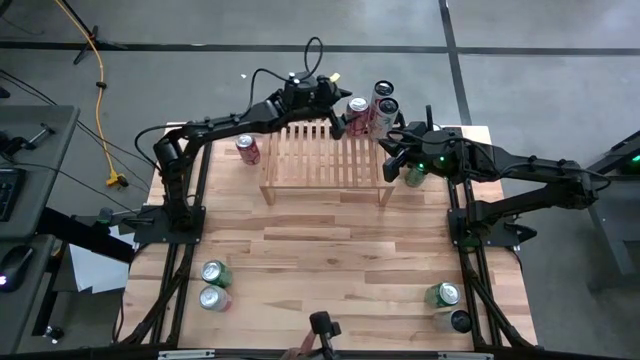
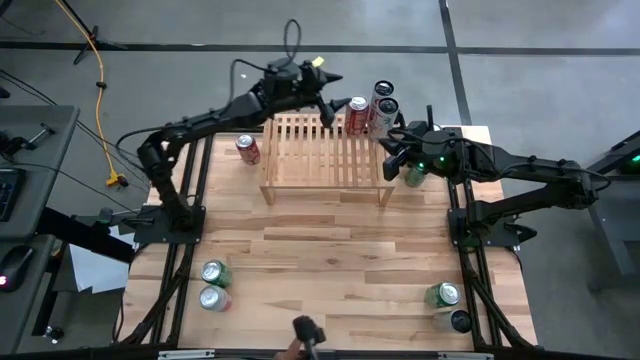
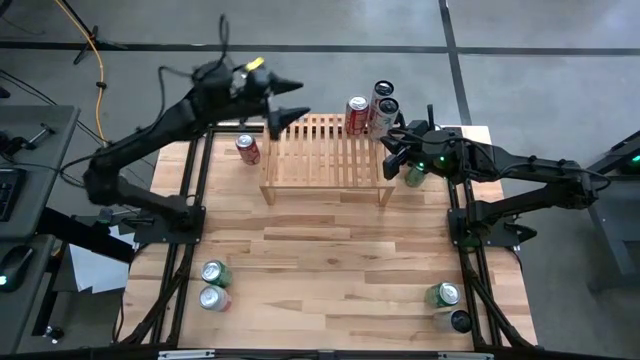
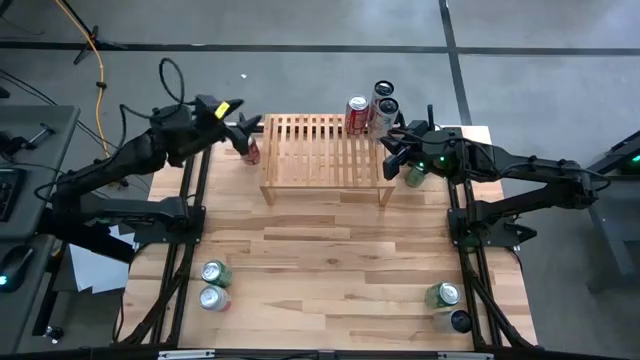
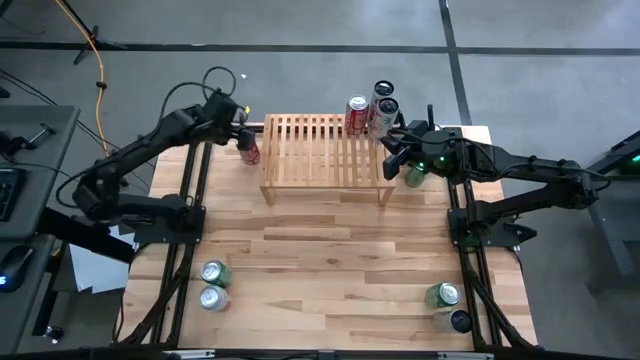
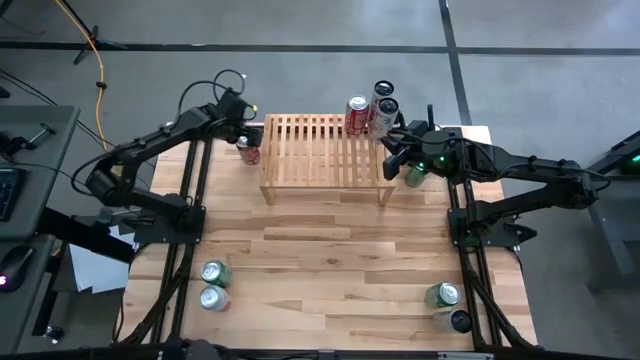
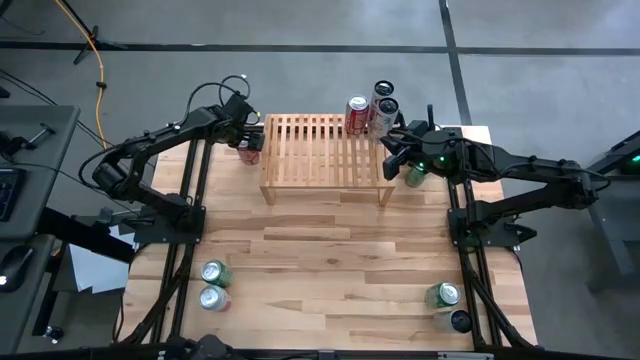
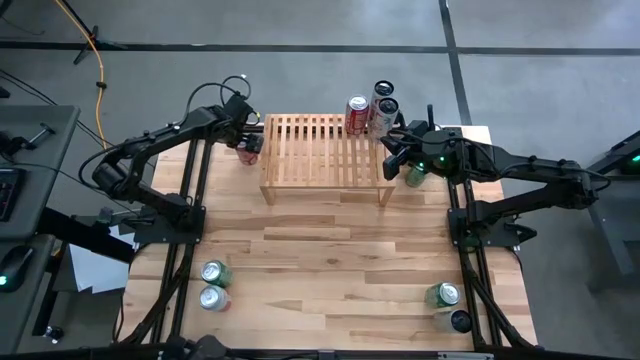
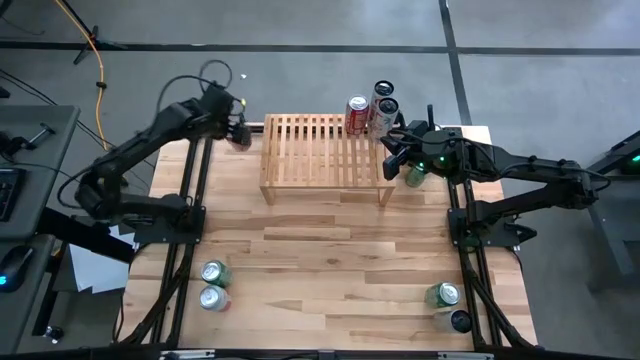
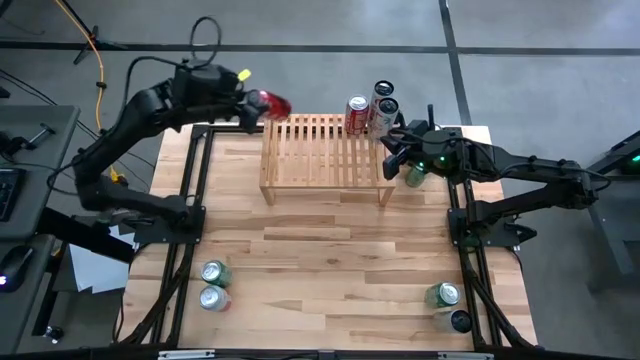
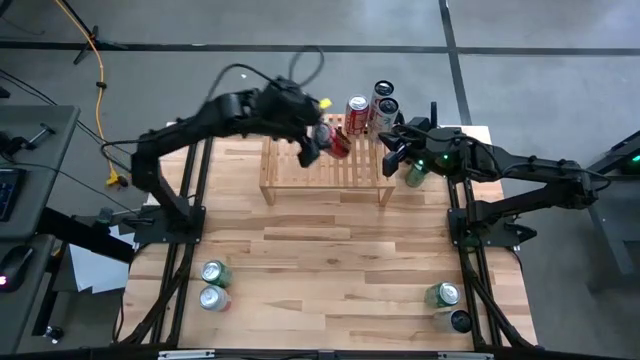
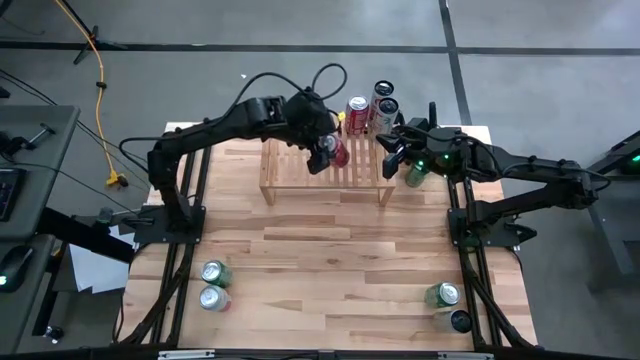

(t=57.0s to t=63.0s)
Task: Place canned beverage on shelf
Put the left red white soda can on the shelf aligned with the other red white soda can

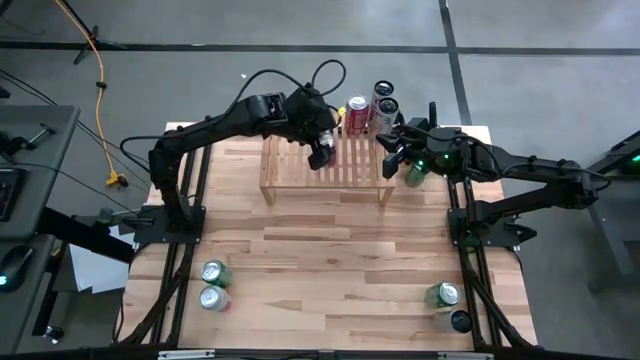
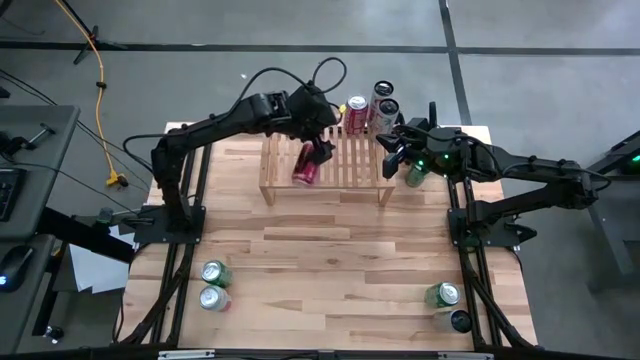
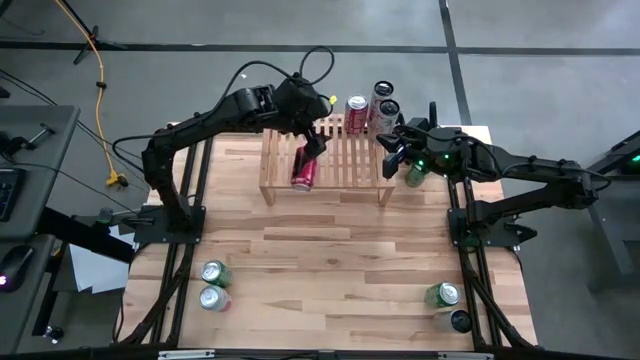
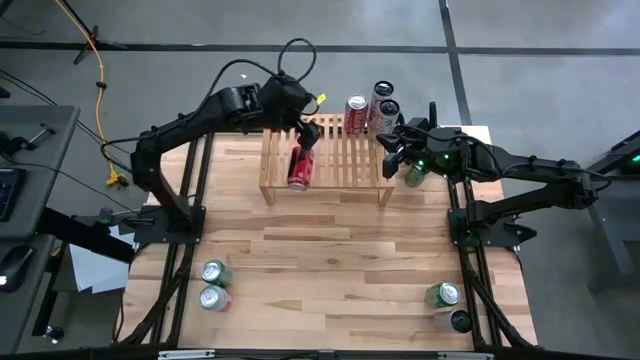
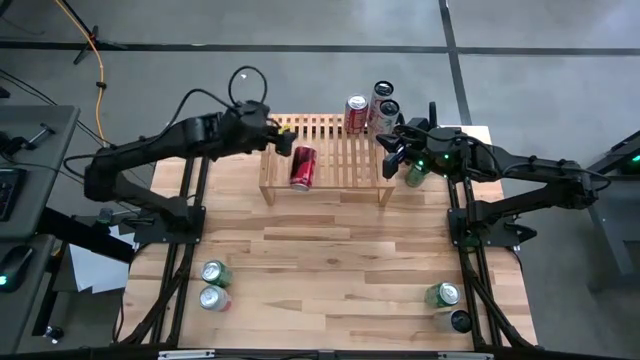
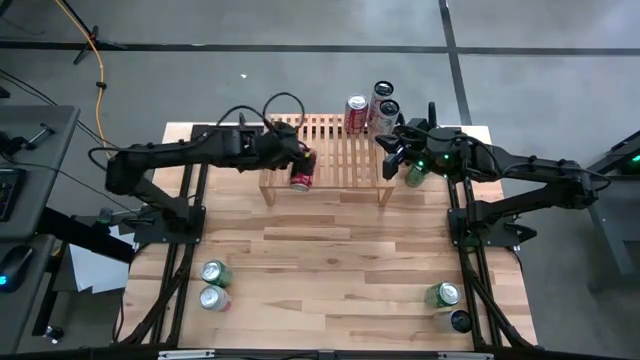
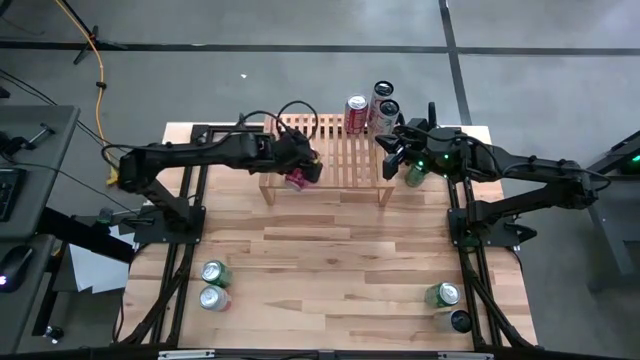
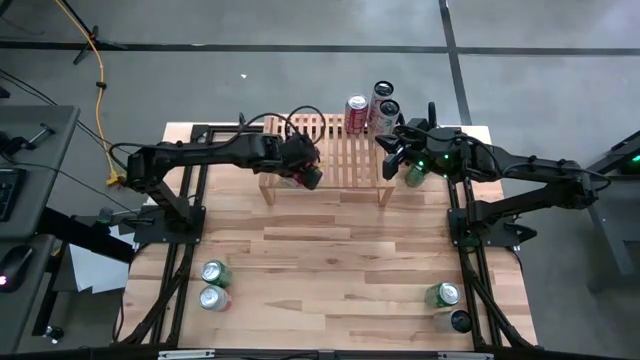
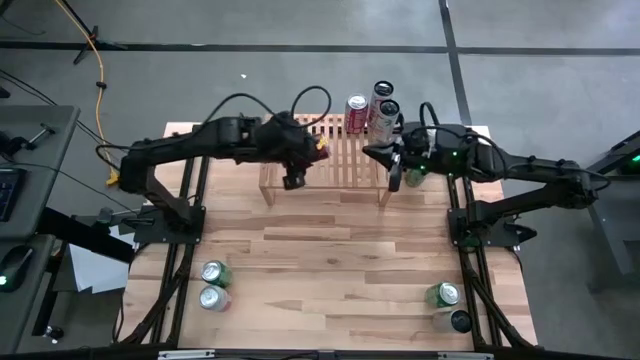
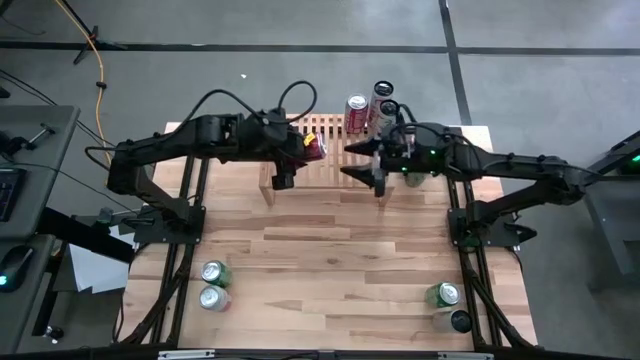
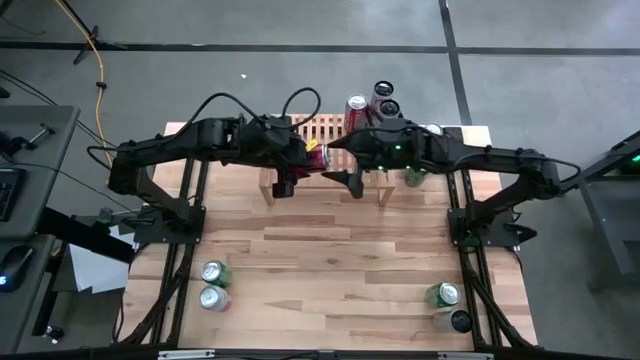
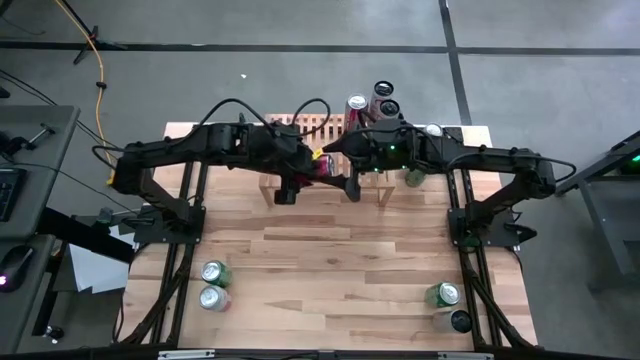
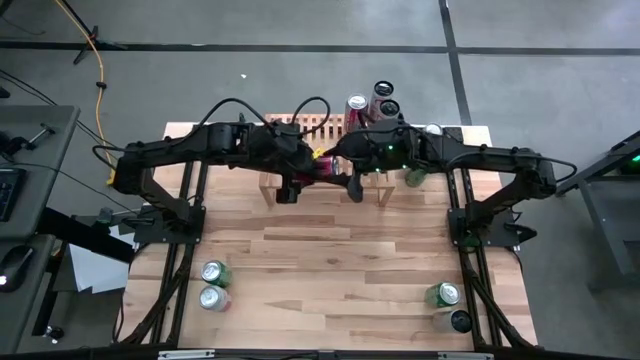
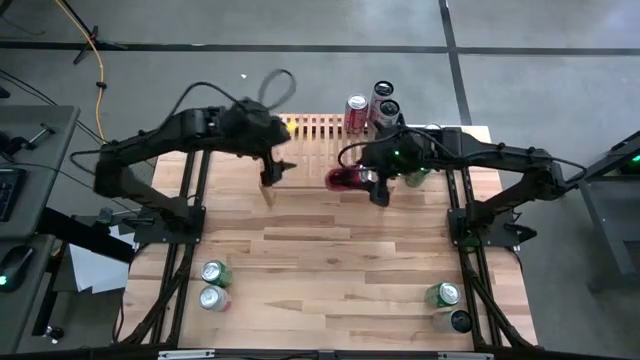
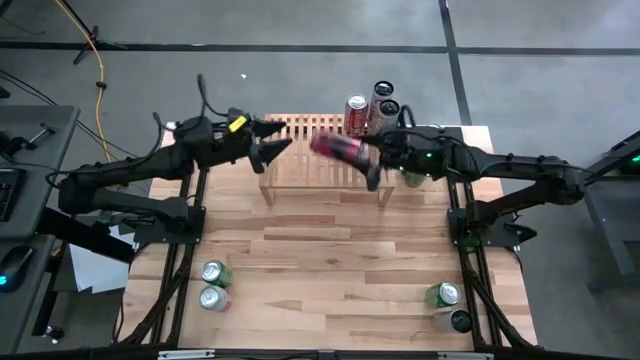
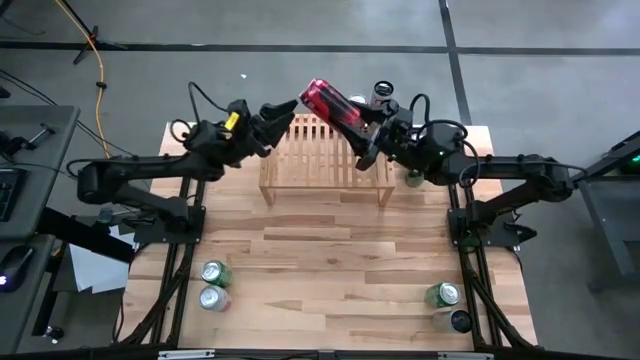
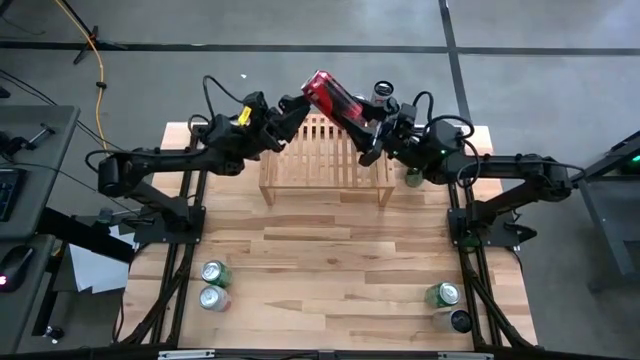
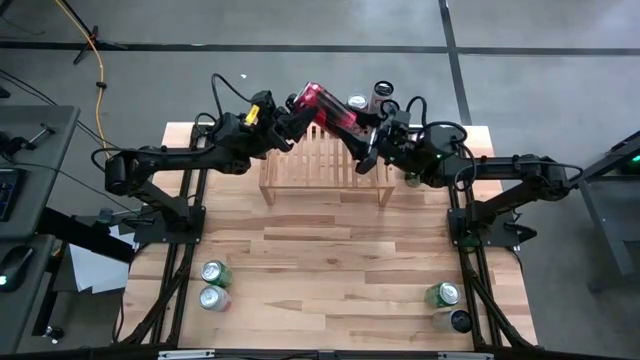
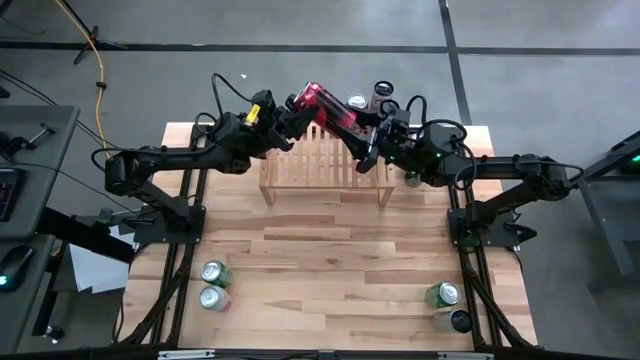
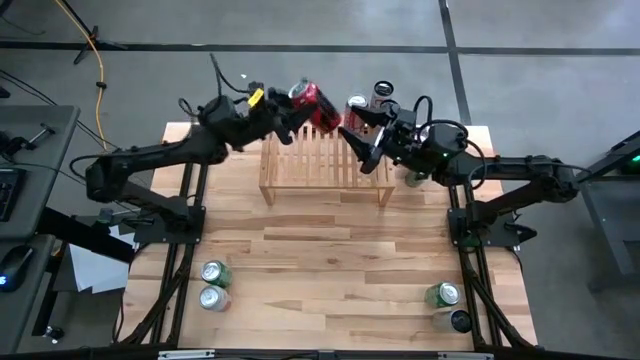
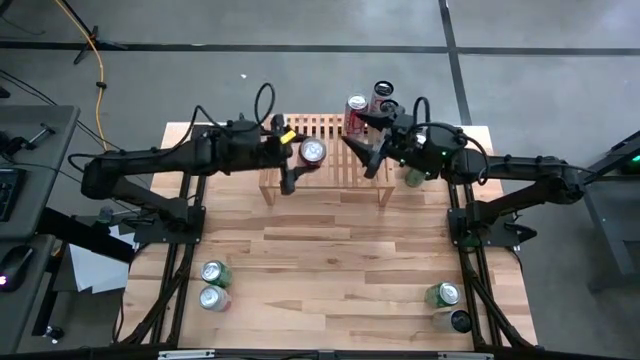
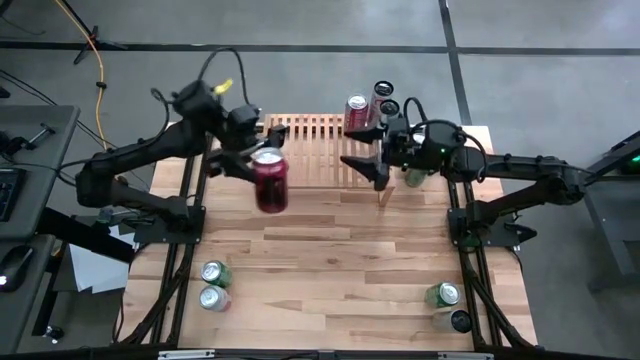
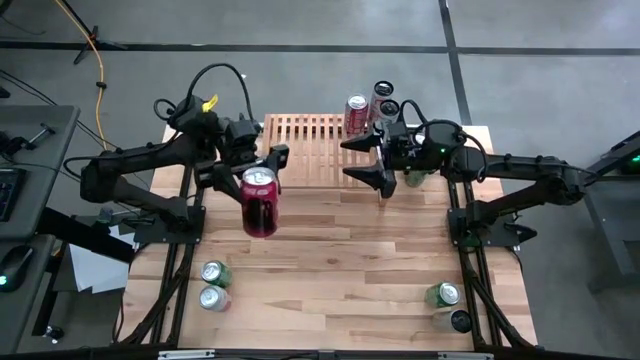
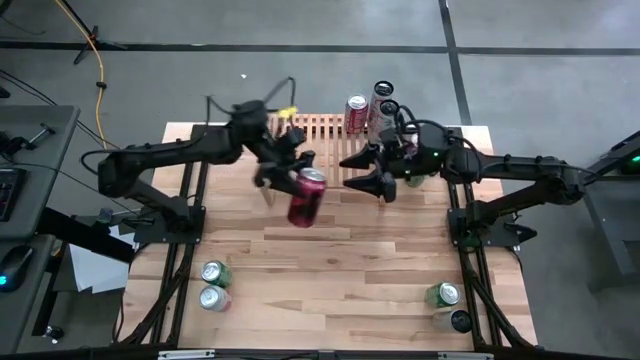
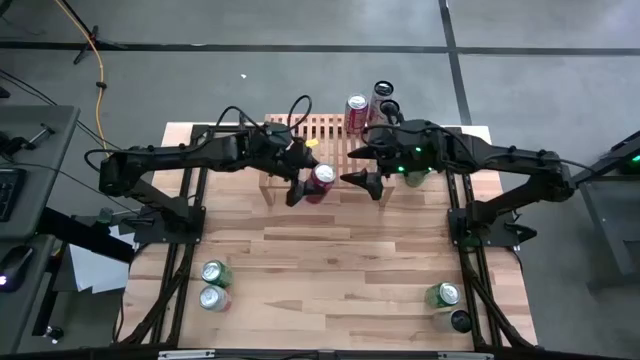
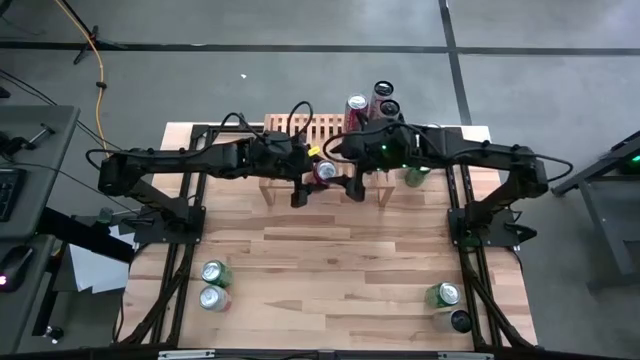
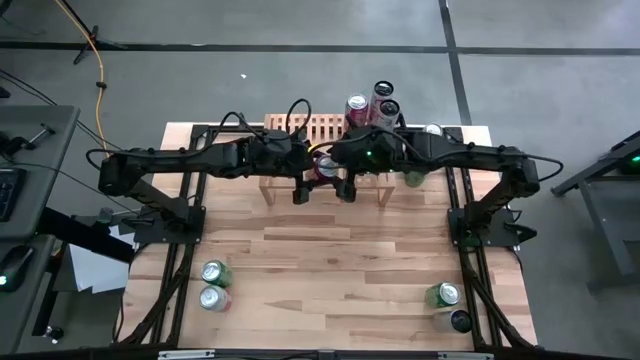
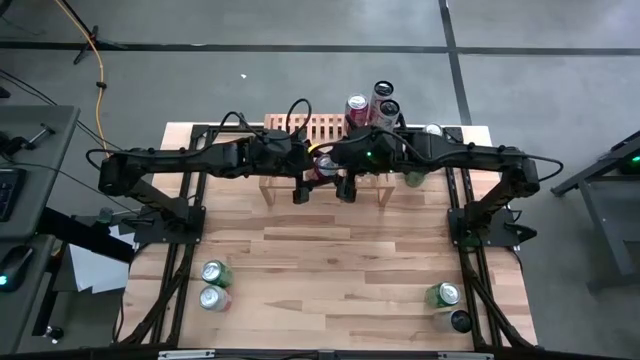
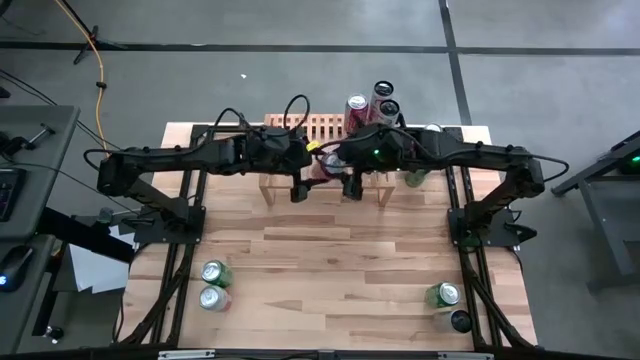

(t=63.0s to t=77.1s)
Put the left red white soda can on the shelf aligned with the other red white soda can
